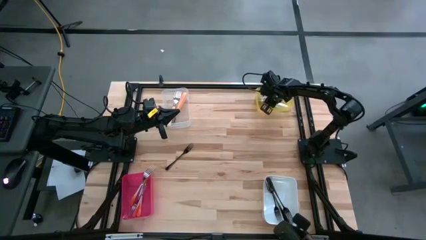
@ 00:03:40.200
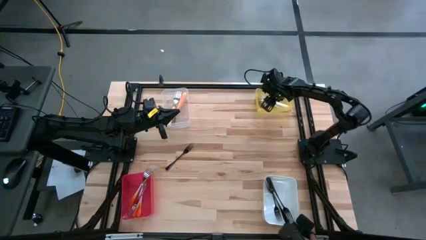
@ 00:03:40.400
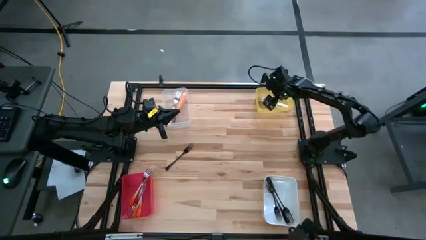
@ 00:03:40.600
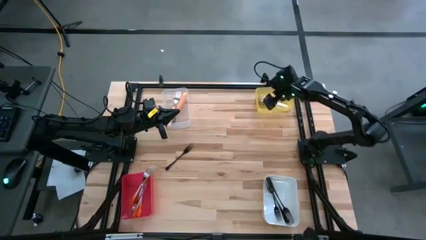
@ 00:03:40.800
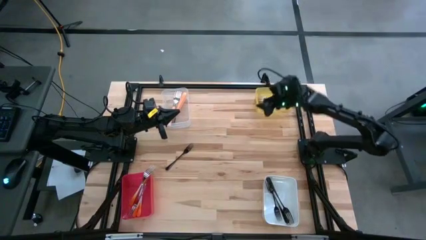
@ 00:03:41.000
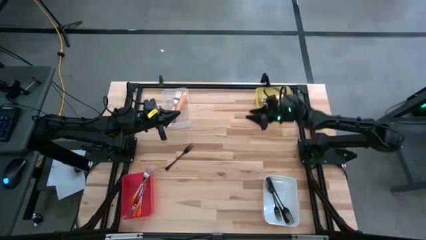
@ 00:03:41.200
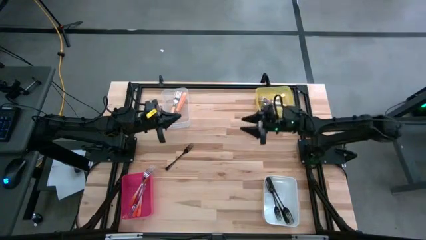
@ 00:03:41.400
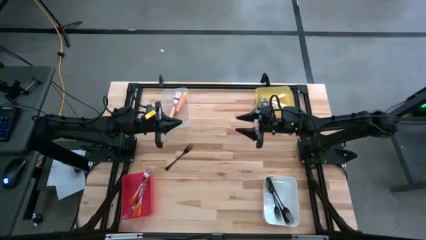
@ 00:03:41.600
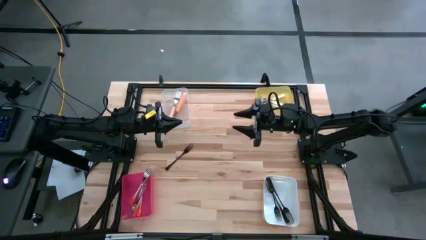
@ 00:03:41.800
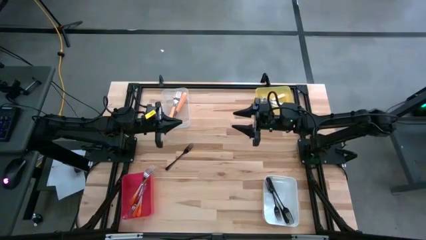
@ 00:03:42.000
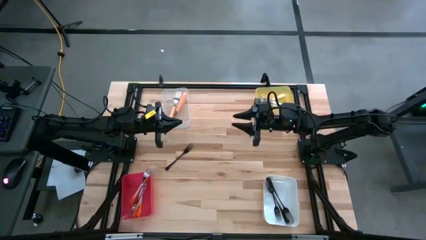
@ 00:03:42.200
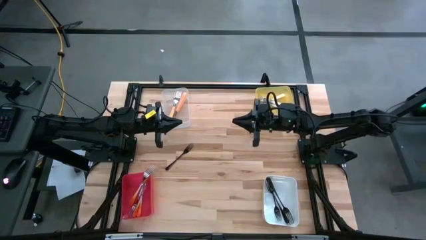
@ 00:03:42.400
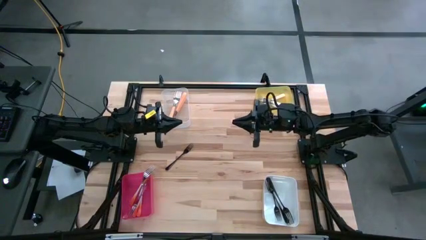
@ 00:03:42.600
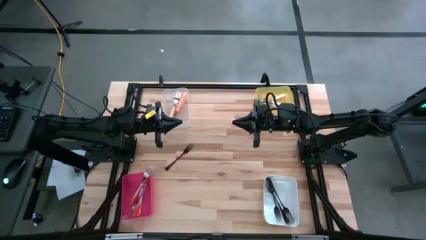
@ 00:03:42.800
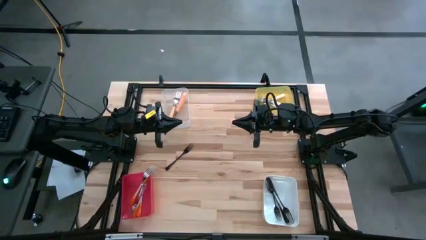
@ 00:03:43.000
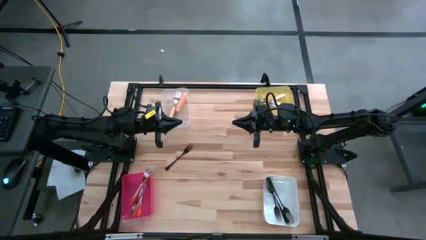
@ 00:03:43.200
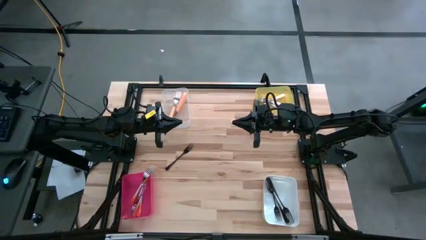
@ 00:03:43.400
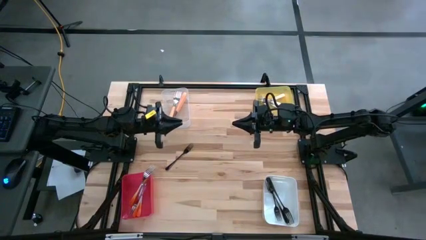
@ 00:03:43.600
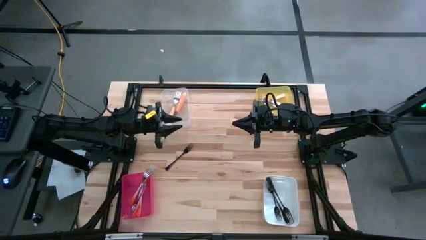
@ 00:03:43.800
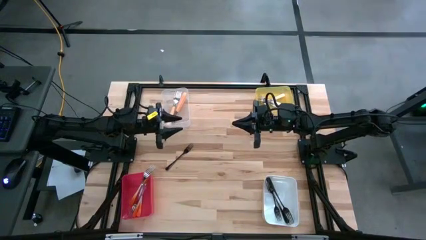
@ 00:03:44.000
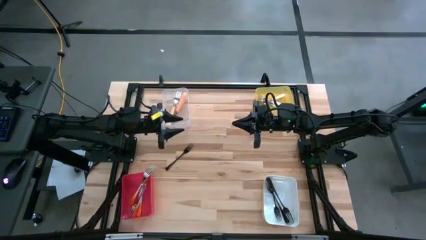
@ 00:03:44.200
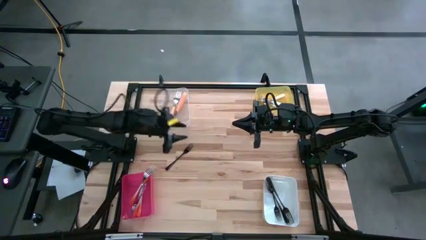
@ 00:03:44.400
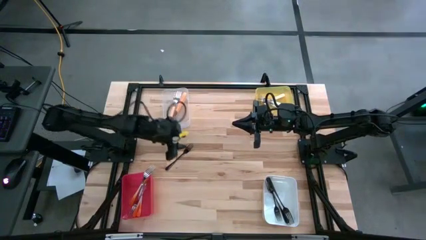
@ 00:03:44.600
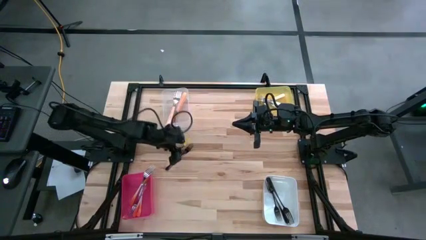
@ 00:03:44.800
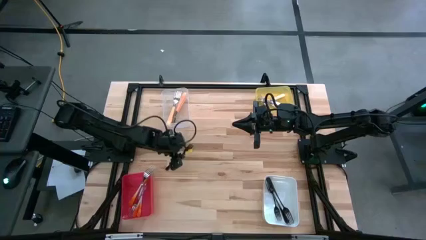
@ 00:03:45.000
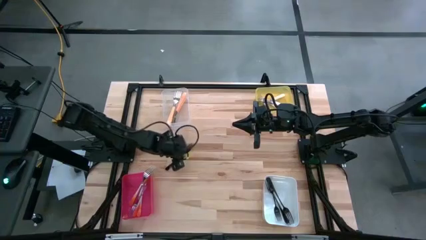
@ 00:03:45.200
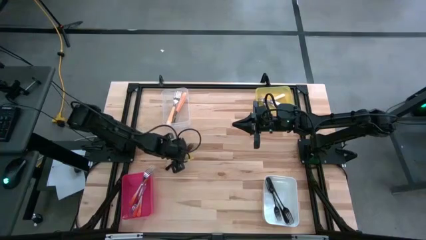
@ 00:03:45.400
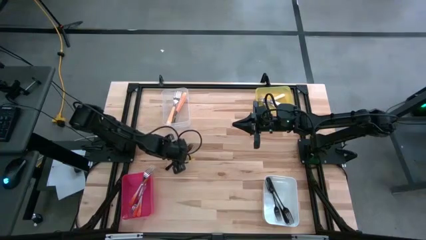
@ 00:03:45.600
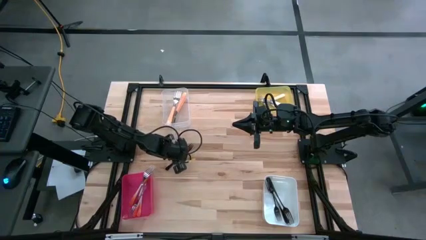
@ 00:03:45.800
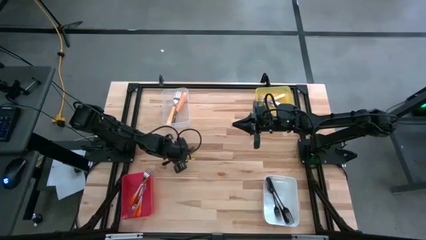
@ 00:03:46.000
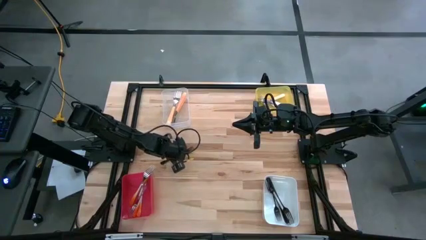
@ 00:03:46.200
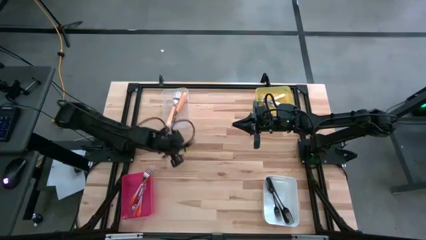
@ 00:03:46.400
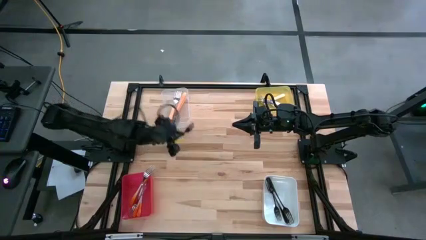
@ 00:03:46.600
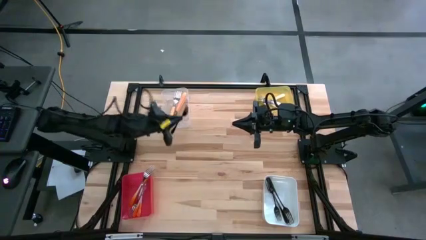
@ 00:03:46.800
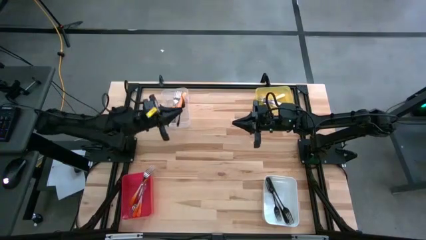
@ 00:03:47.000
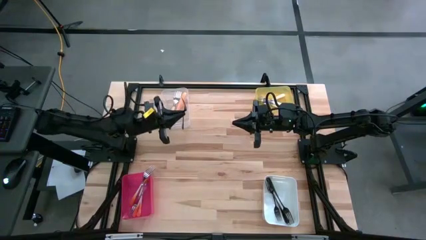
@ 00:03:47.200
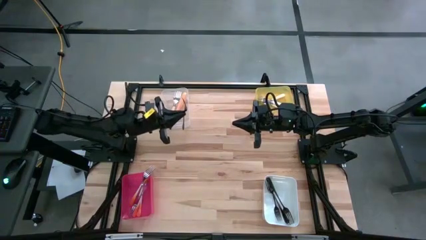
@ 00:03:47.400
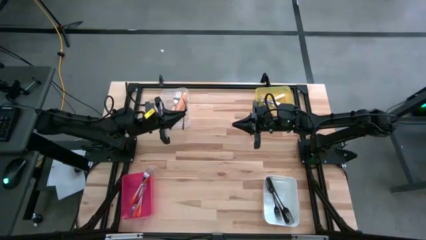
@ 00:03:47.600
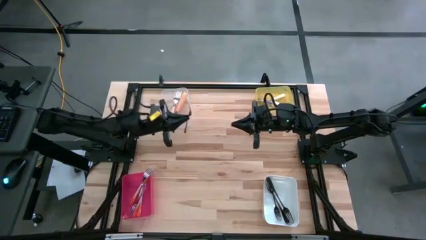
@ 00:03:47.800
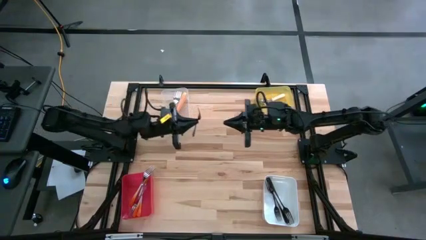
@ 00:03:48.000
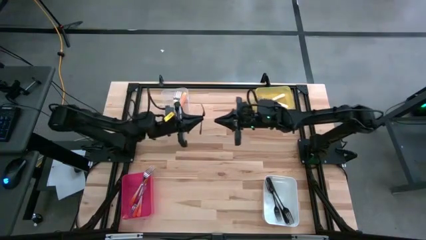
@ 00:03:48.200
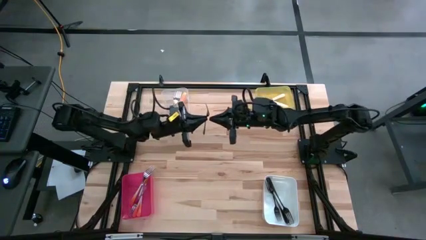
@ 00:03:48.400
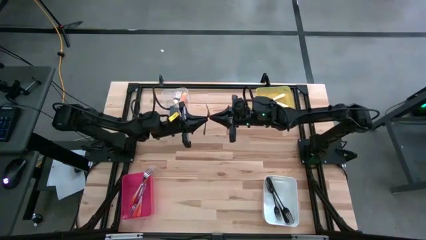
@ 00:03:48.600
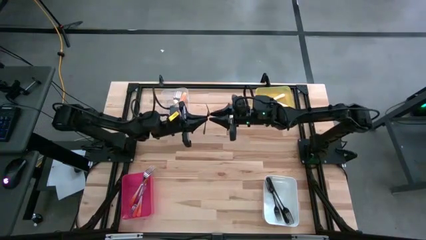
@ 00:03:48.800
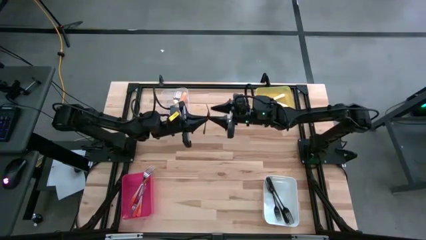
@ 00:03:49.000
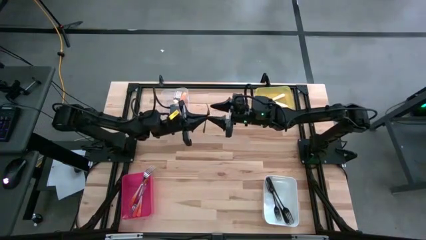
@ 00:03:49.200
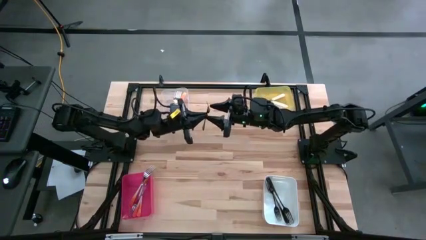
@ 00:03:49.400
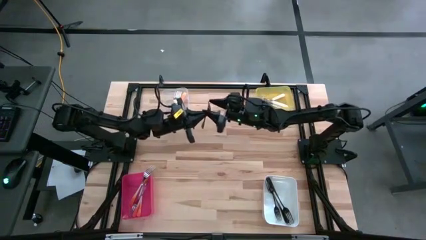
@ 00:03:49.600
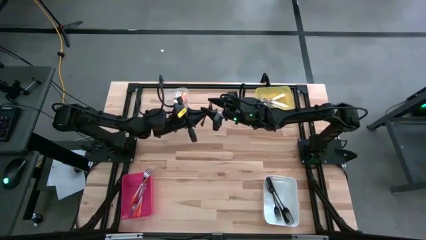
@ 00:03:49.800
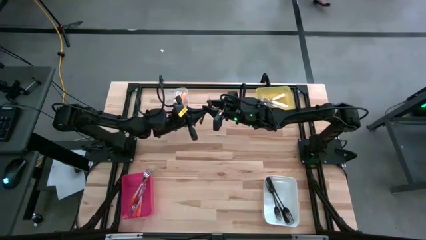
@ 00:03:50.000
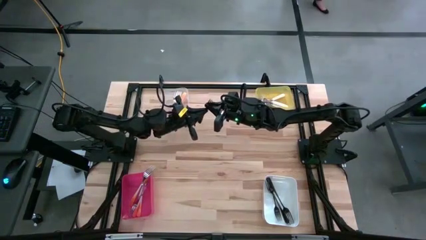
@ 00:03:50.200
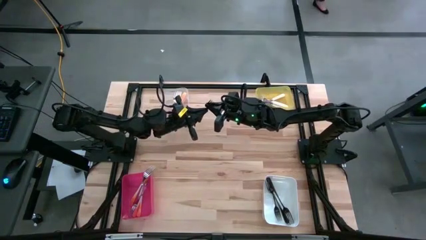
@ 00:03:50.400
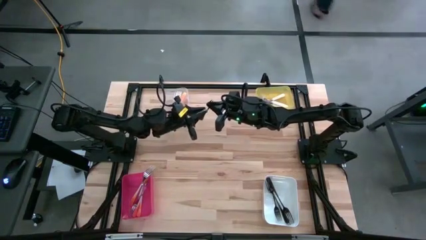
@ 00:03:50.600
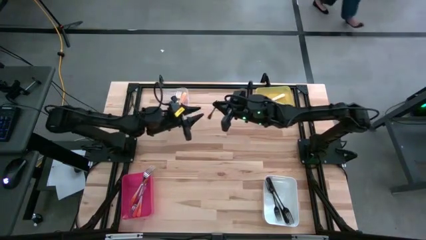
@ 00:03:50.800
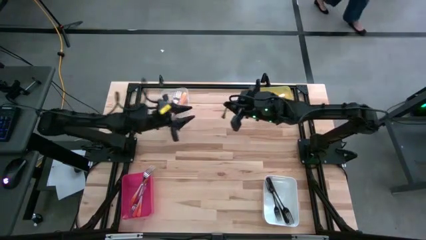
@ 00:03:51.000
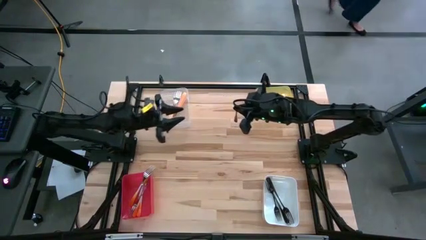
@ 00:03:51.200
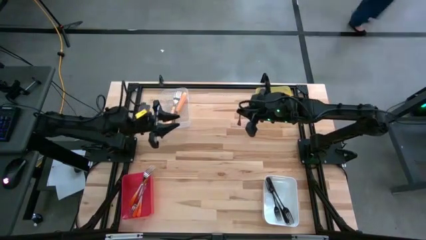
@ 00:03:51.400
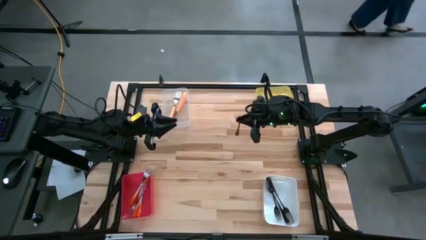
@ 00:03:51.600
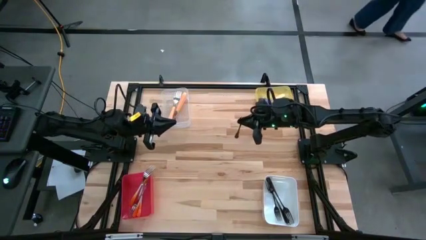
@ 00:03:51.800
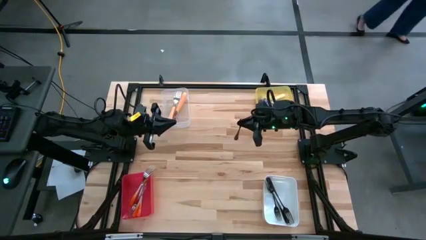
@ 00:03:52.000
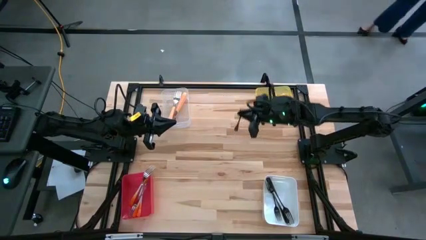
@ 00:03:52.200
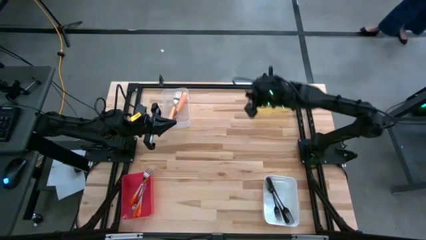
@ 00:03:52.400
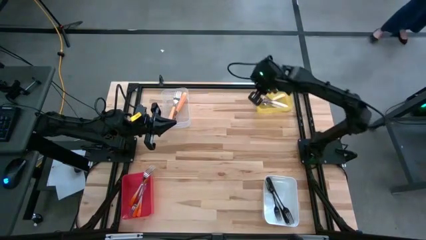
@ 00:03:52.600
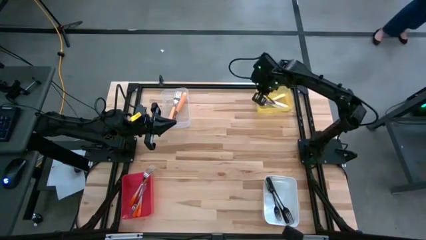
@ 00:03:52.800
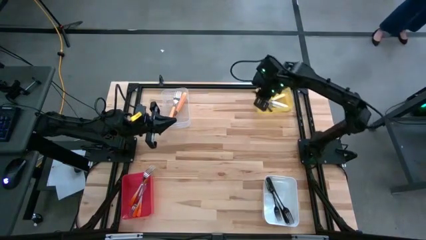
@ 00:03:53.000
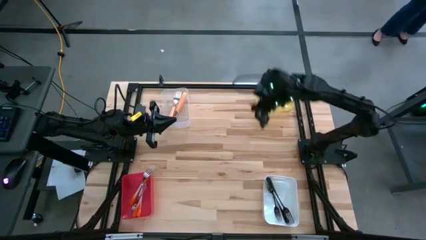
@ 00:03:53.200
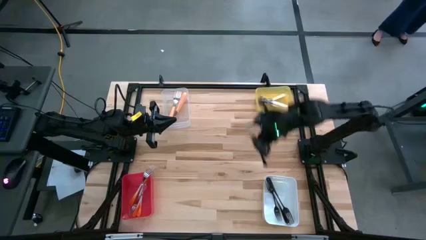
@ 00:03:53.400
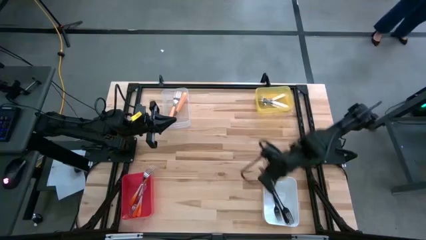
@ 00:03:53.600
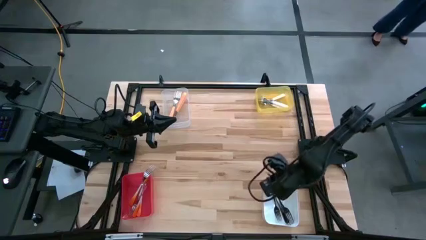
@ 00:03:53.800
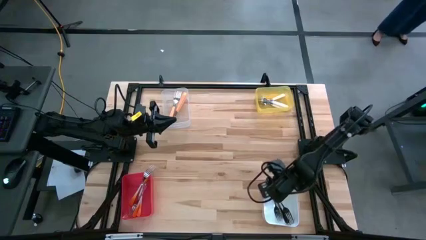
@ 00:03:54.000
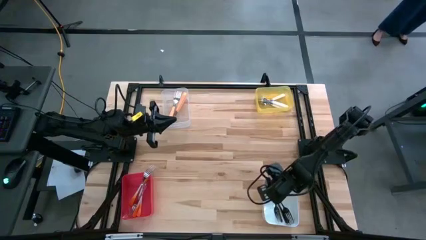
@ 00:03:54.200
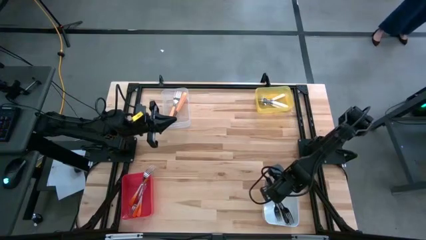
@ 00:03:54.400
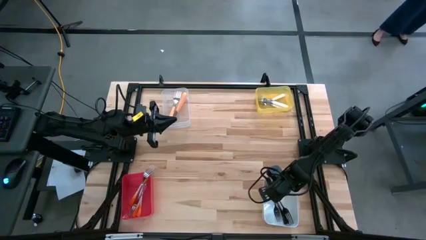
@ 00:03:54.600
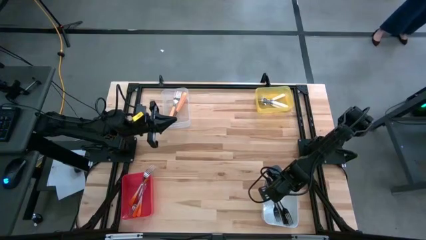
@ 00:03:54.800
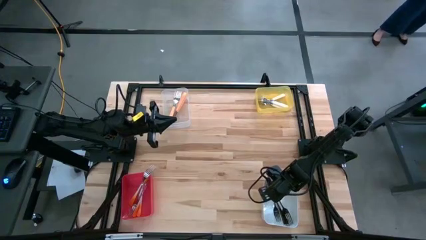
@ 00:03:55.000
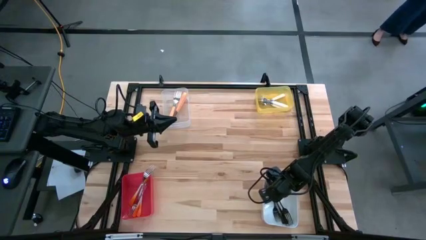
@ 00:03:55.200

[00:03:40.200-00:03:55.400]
Task: Sort silverware by color (type)
Put the black fork into the white bin
